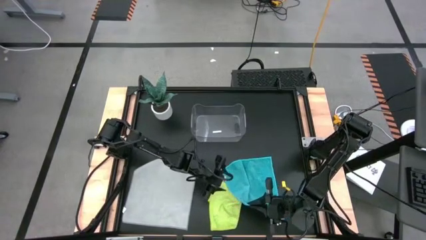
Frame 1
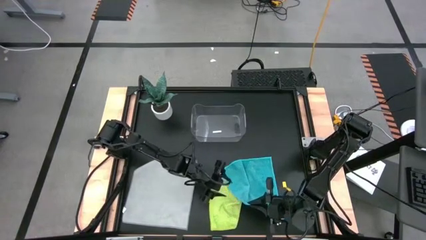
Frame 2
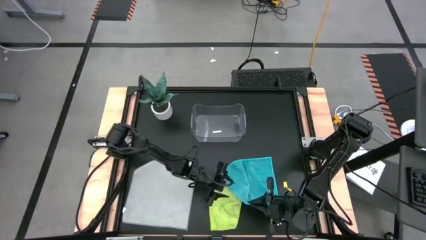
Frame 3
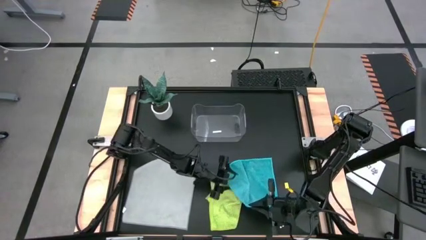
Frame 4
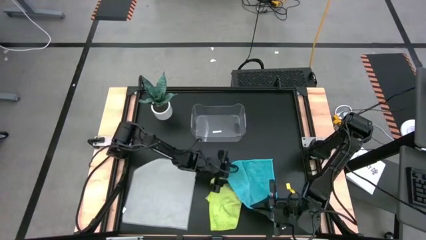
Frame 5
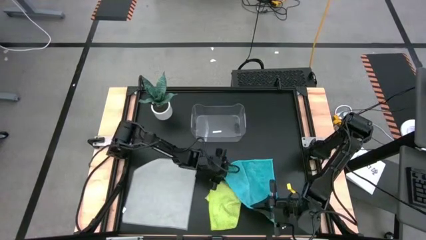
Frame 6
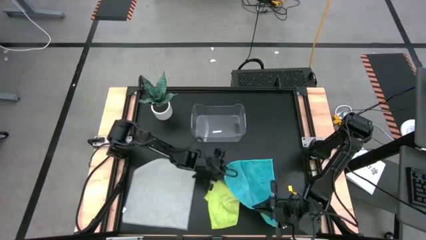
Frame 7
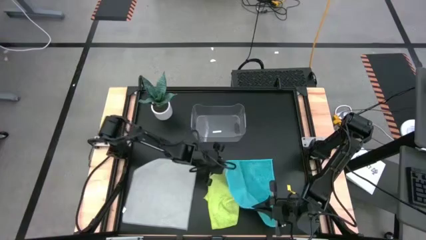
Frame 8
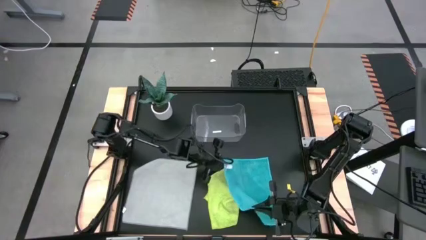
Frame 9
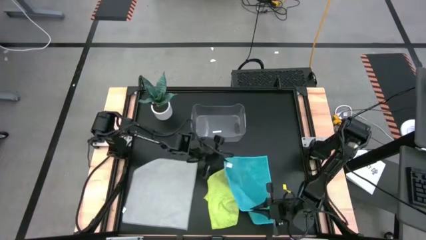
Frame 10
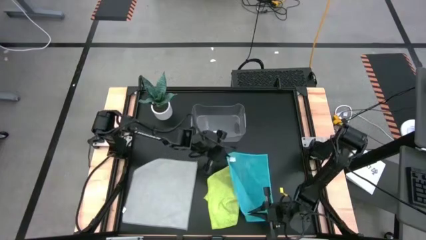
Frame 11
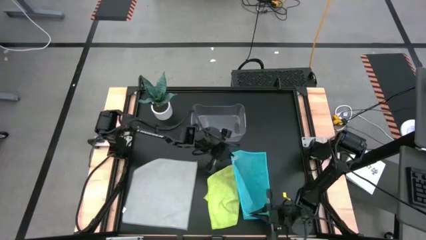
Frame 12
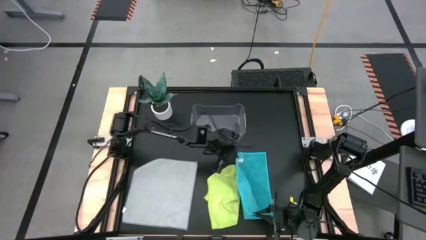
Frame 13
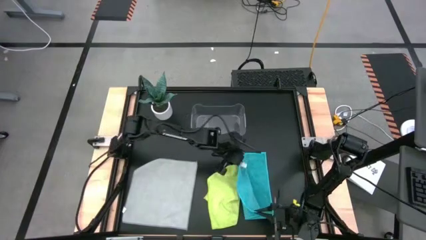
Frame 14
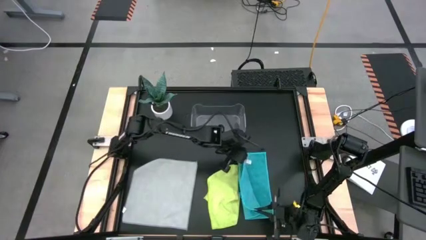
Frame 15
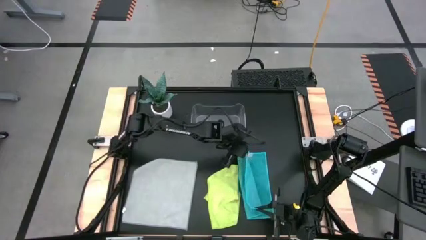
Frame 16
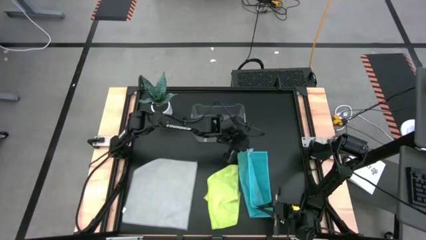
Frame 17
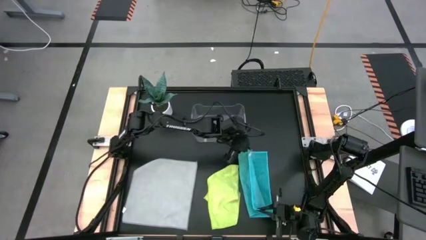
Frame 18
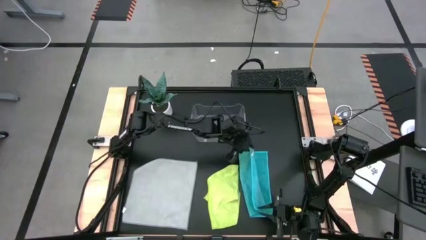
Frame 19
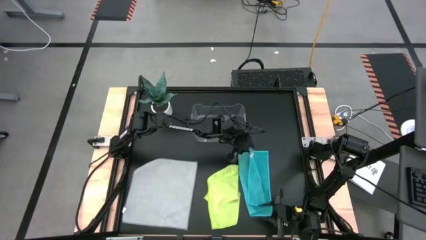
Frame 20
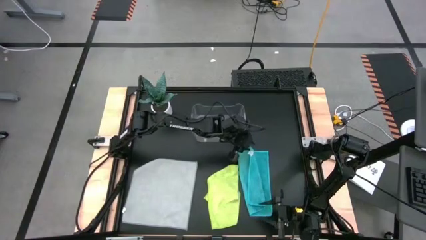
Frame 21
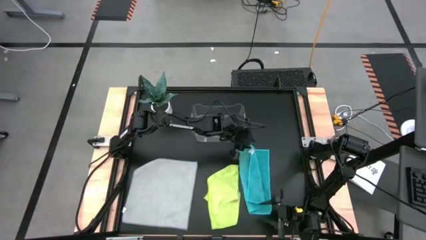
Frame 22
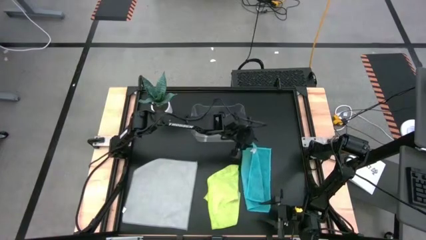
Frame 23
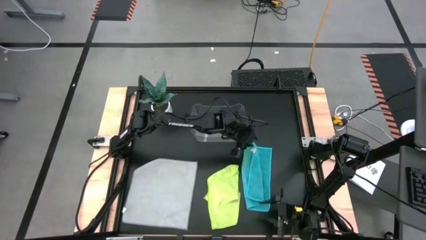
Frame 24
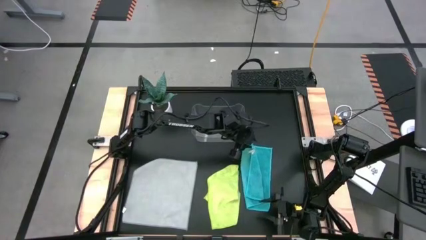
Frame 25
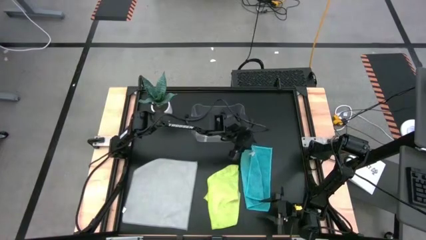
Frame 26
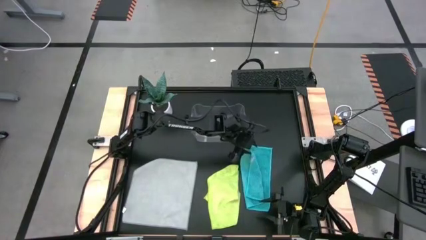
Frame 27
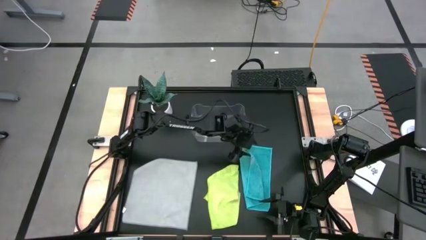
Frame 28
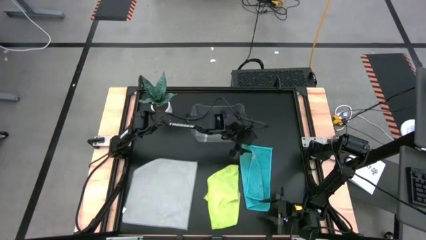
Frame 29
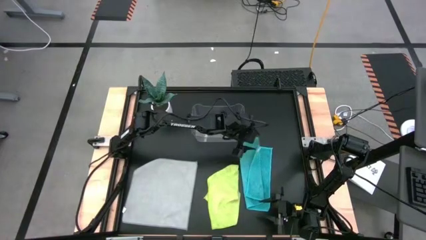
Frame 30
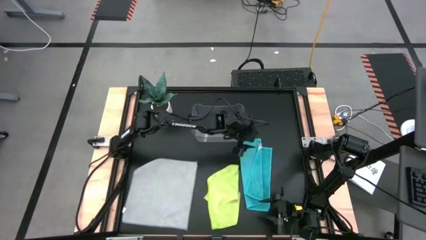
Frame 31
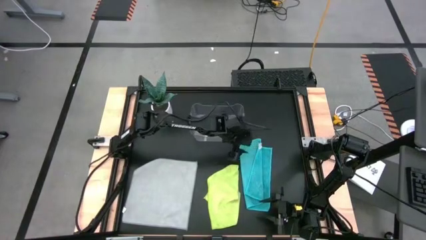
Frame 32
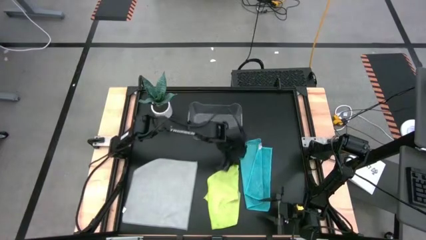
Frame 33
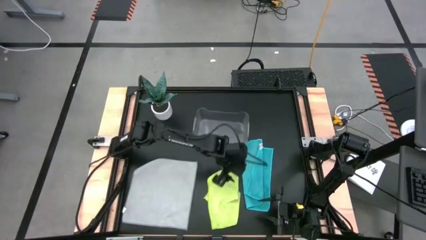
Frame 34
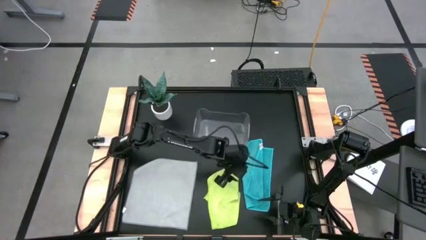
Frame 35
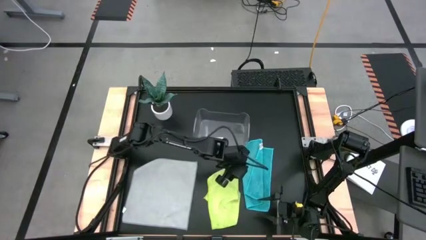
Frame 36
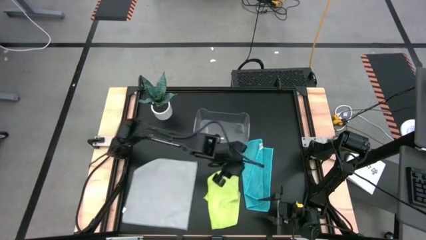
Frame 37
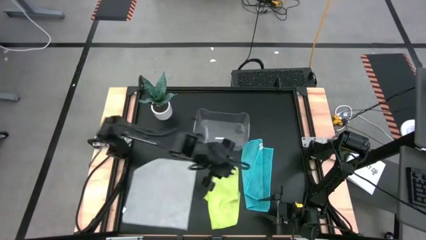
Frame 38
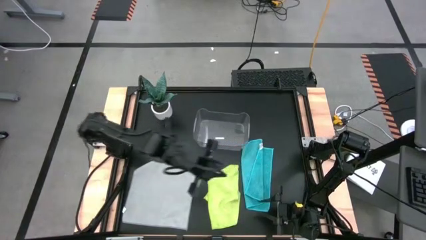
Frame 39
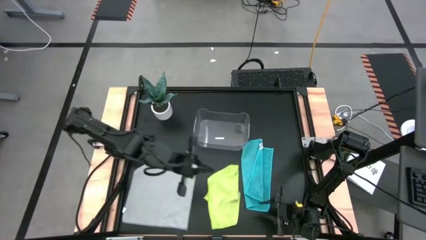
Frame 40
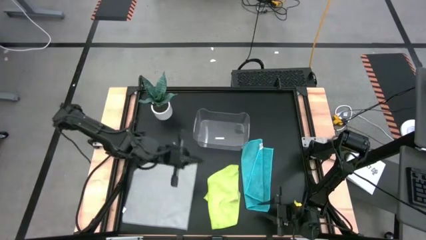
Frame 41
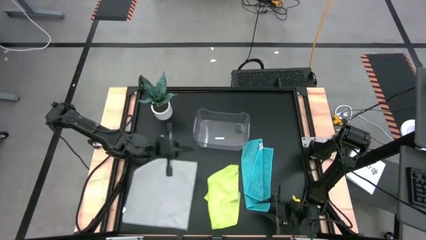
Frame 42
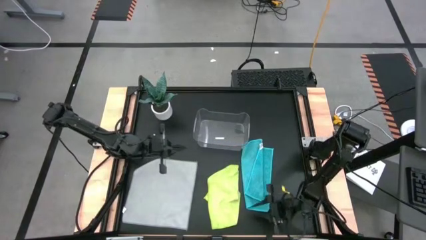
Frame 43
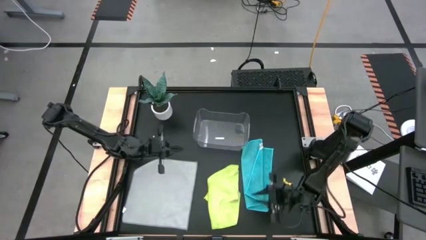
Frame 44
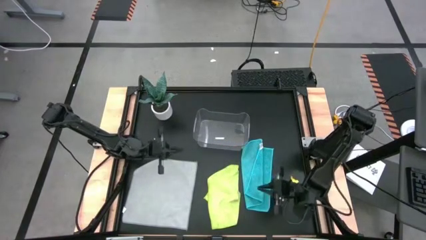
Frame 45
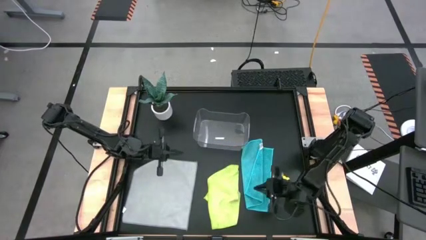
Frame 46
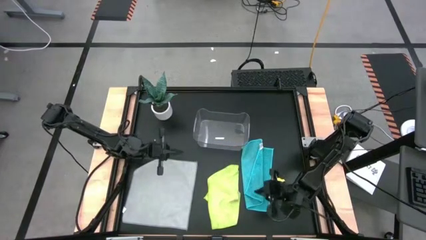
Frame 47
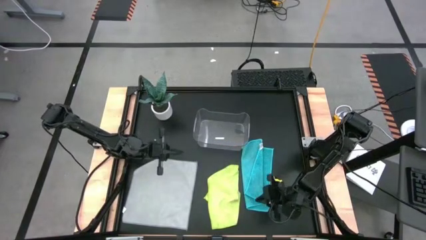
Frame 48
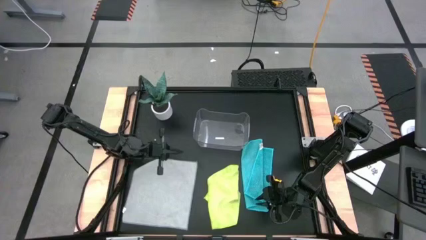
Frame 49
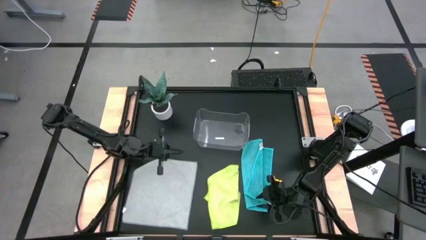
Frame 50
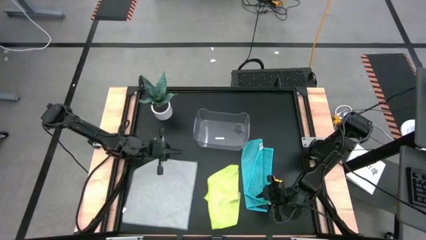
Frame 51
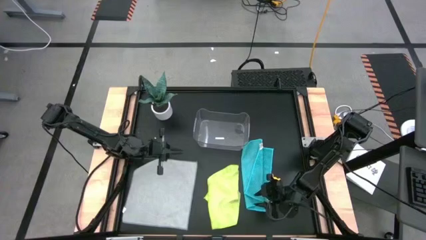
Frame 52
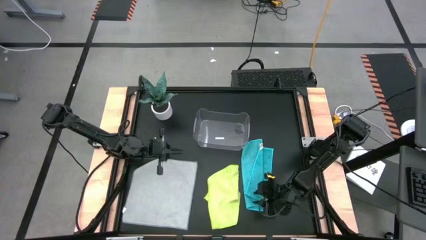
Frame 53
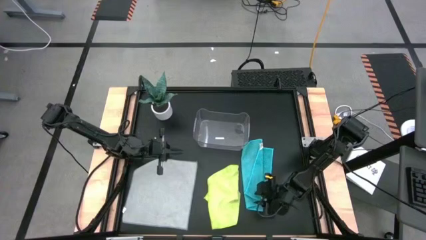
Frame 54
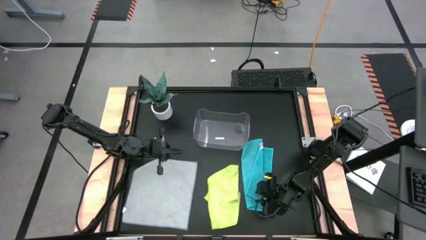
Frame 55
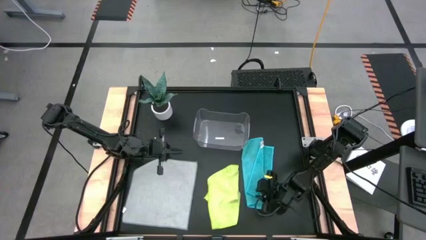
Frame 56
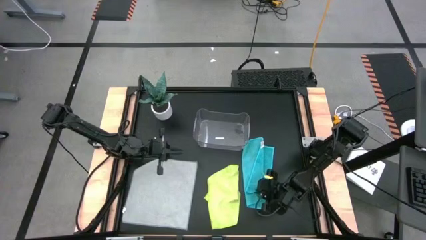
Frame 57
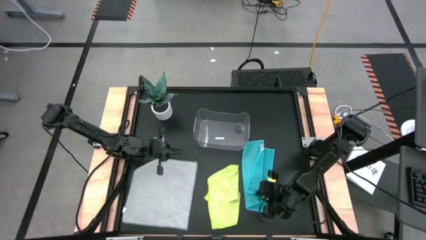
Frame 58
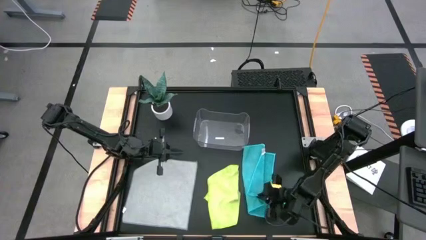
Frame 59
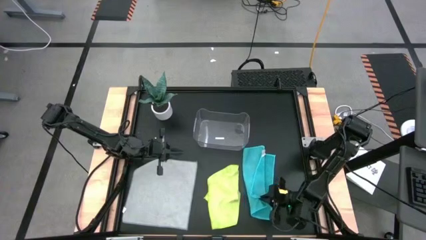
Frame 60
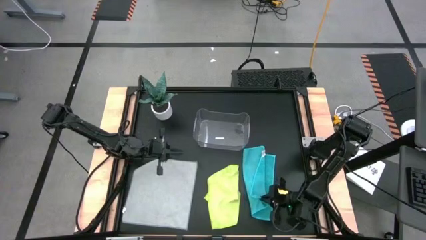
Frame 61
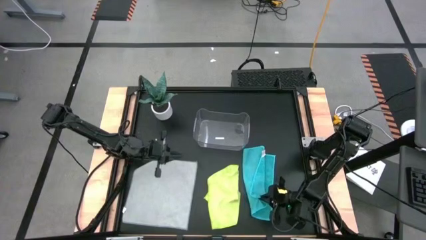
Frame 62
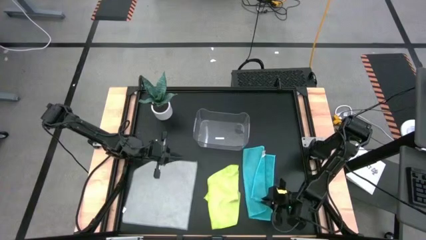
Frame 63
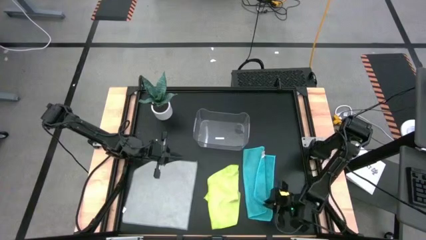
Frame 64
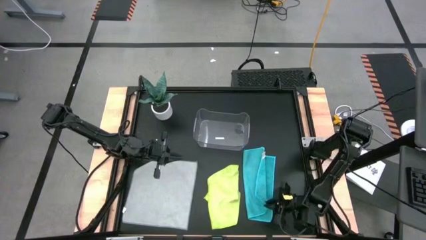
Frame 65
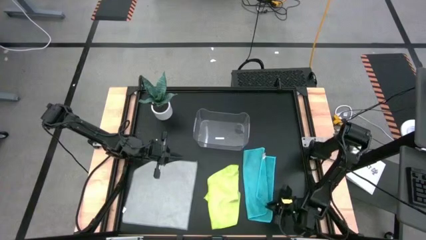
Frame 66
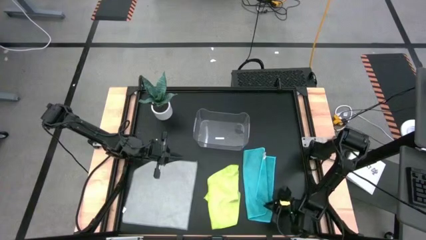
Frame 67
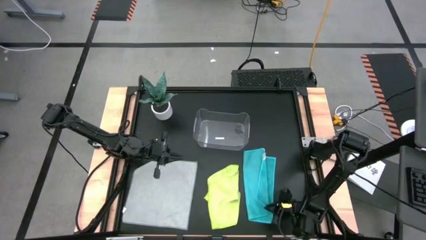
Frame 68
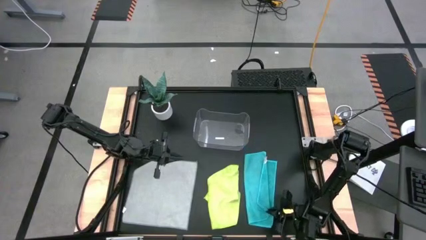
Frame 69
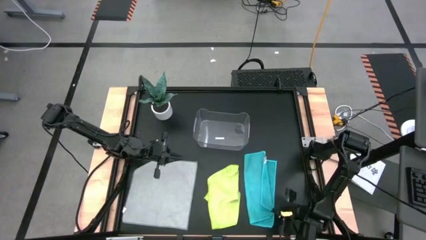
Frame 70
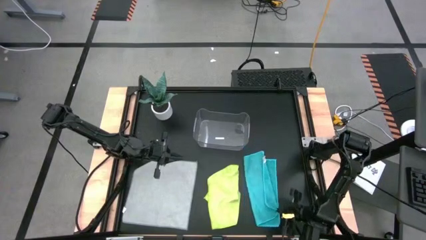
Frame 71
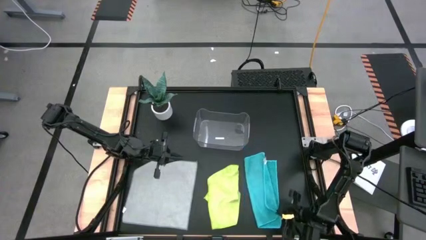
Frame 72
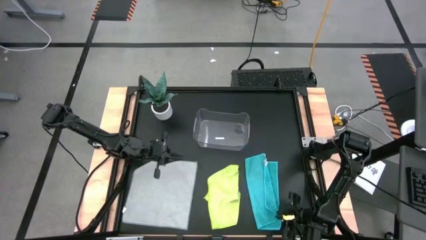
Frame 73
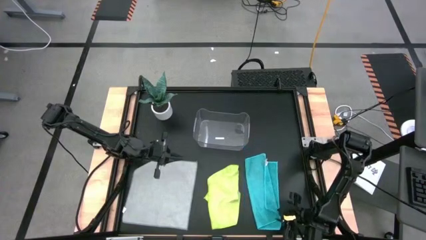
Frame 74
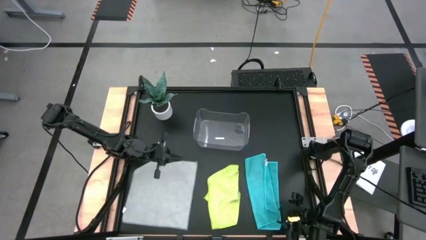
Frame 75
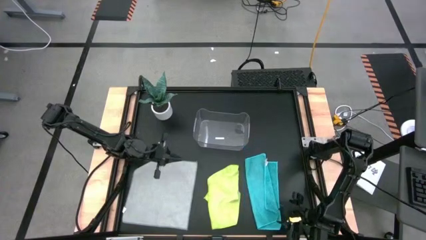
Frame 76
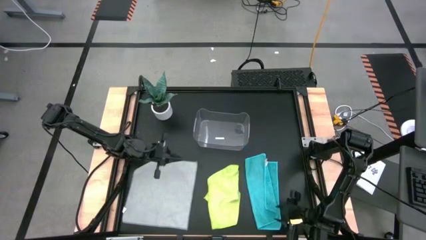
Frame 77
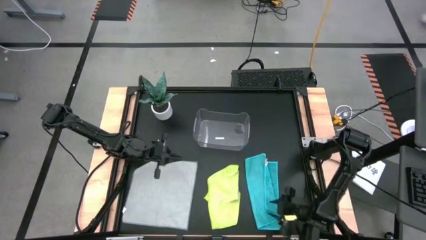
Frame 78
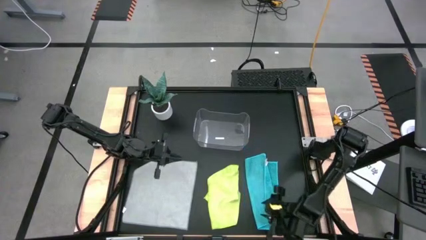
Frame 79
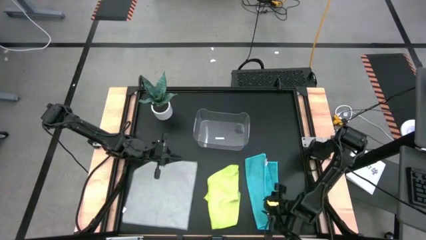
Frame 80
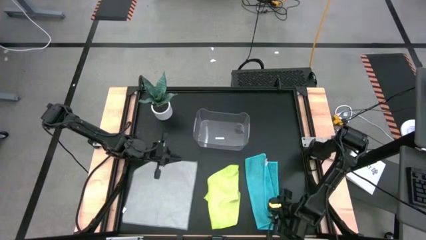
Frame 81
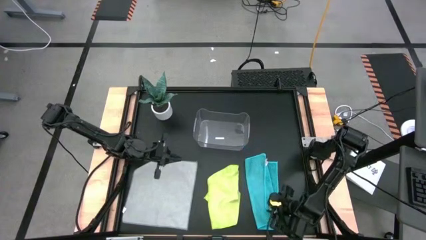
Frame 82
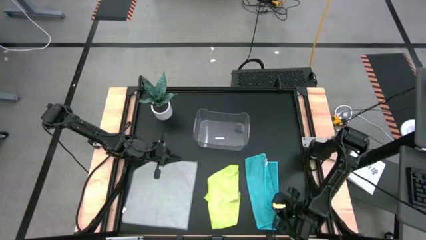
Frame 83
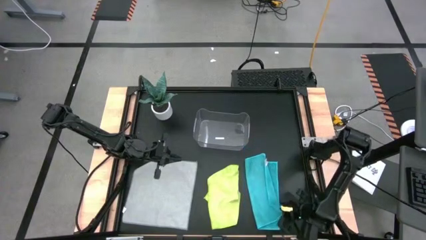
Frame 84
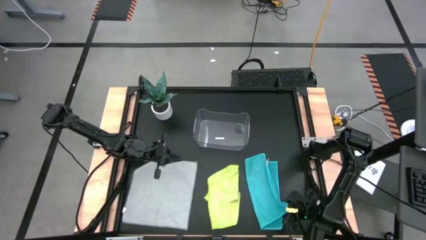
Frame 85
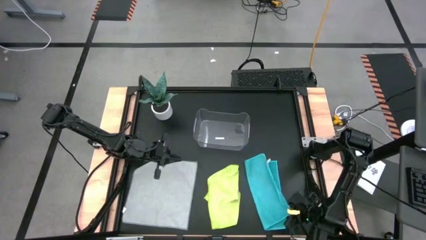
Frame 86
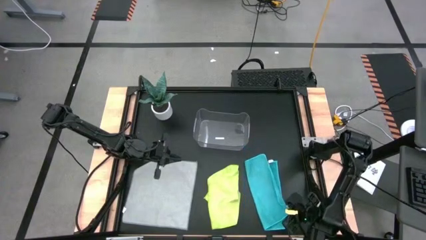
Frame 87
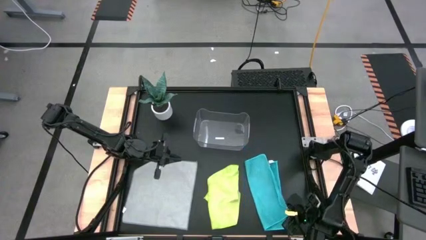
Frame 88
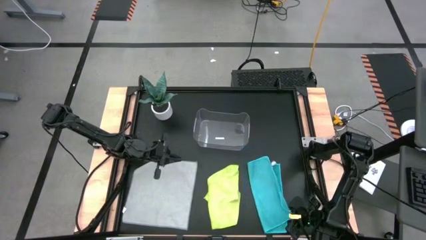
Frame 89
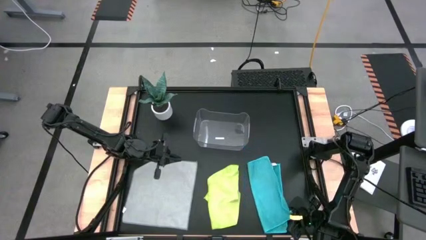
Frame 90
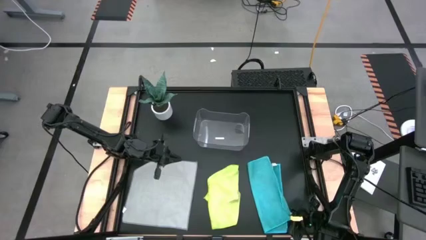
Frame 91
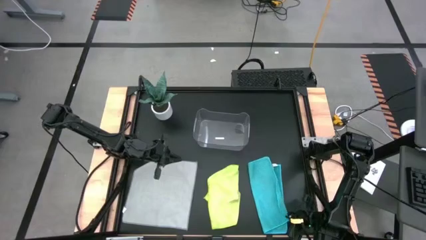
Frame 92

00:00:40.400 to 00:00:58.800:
Task: Fold microfiber towels
Fold the blue towel
